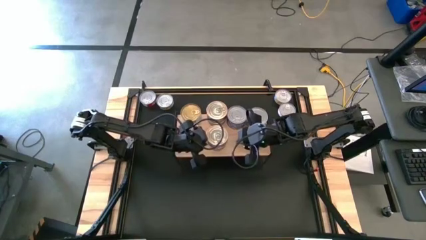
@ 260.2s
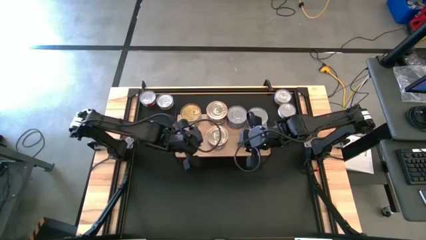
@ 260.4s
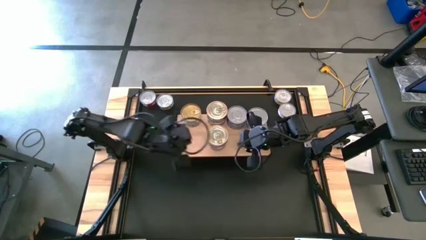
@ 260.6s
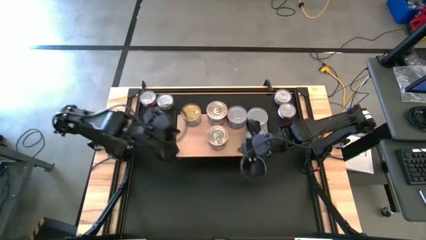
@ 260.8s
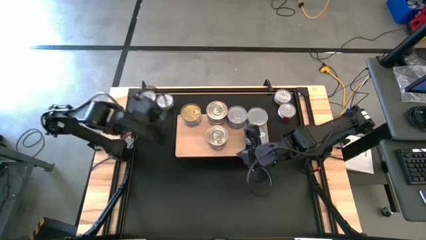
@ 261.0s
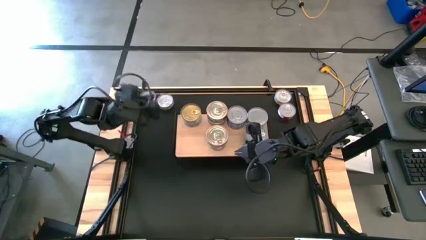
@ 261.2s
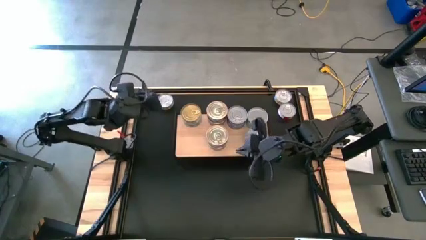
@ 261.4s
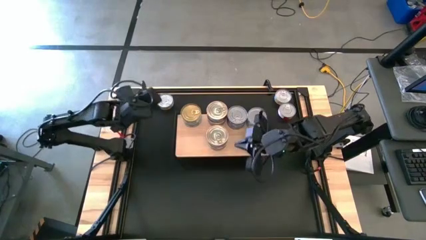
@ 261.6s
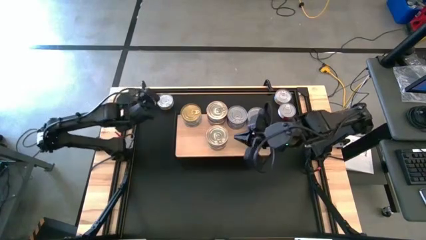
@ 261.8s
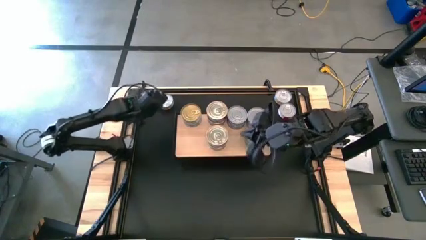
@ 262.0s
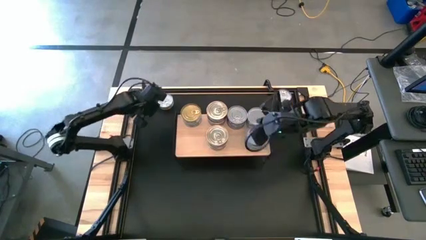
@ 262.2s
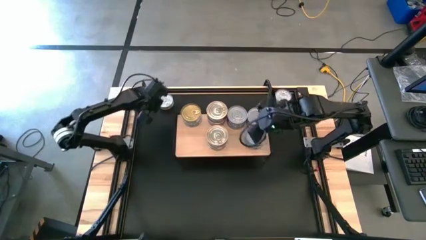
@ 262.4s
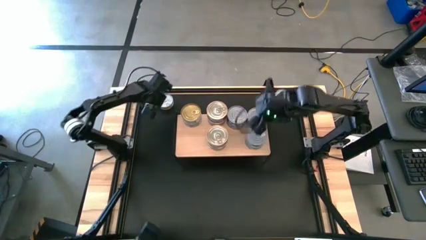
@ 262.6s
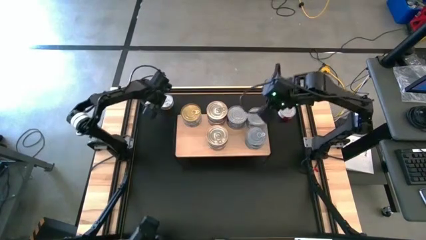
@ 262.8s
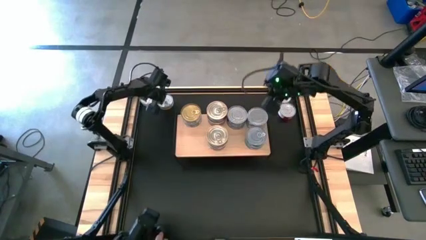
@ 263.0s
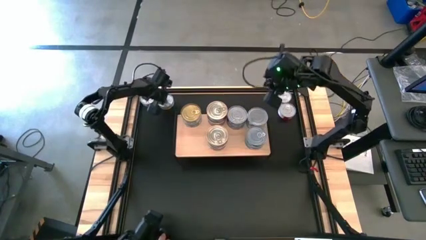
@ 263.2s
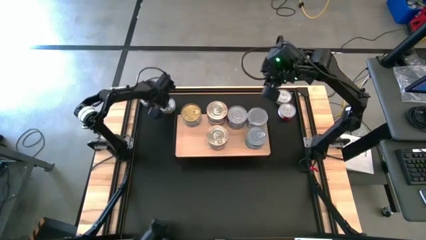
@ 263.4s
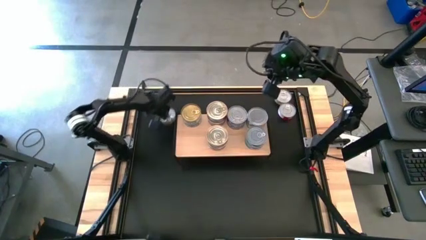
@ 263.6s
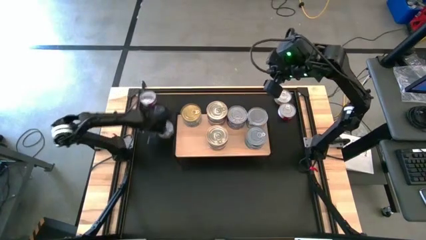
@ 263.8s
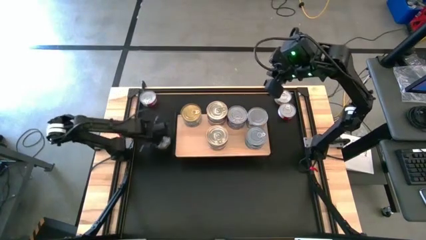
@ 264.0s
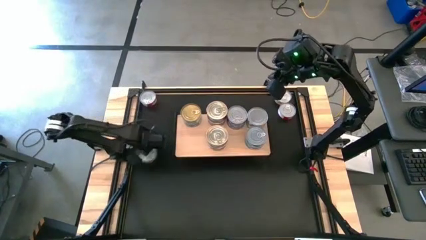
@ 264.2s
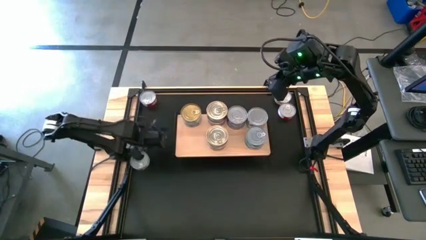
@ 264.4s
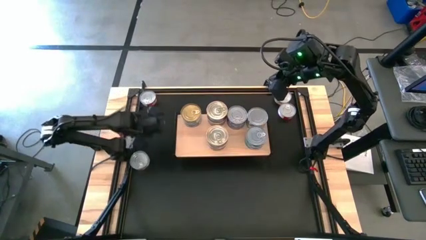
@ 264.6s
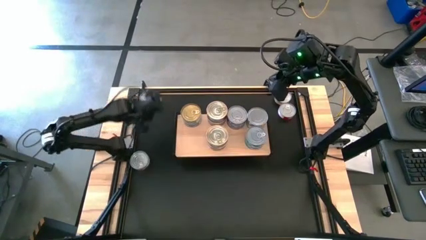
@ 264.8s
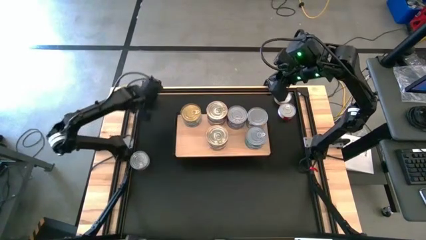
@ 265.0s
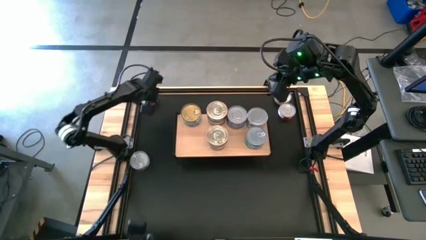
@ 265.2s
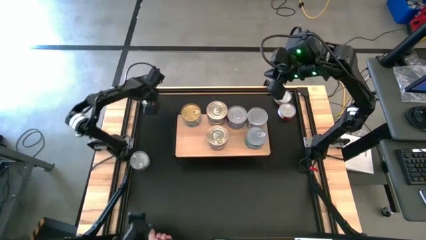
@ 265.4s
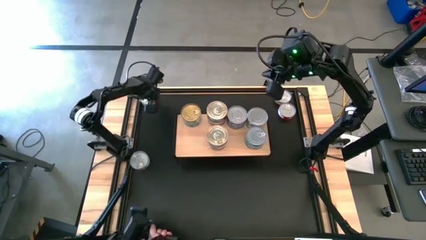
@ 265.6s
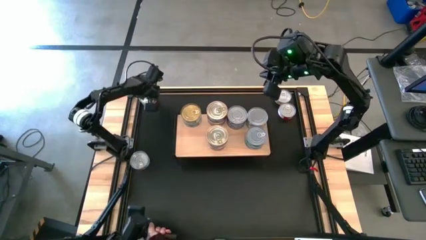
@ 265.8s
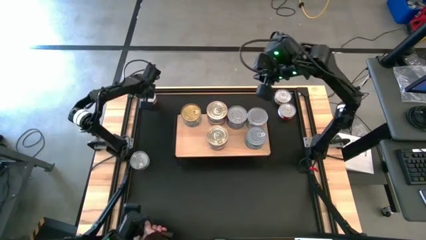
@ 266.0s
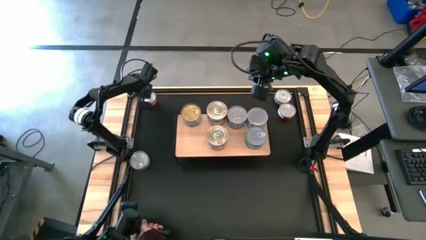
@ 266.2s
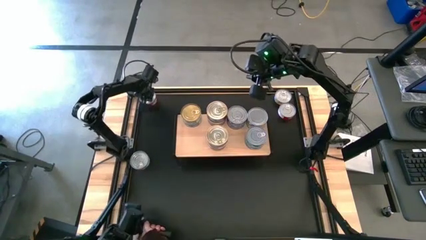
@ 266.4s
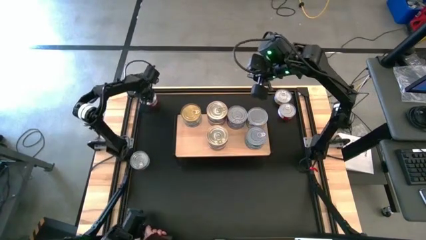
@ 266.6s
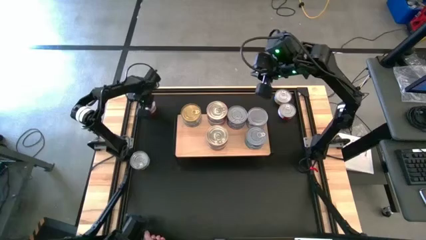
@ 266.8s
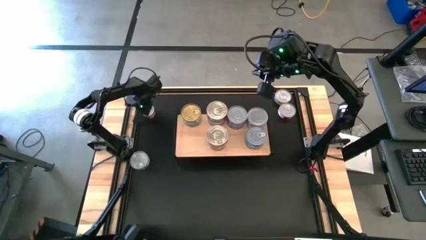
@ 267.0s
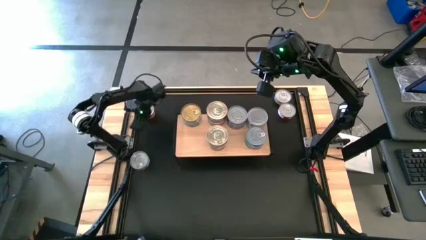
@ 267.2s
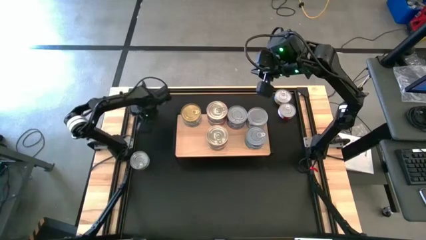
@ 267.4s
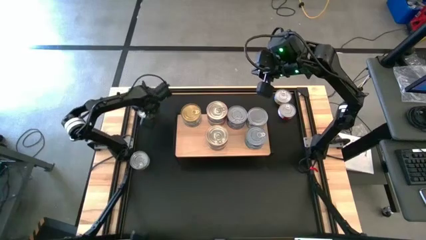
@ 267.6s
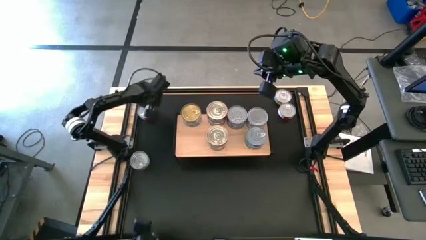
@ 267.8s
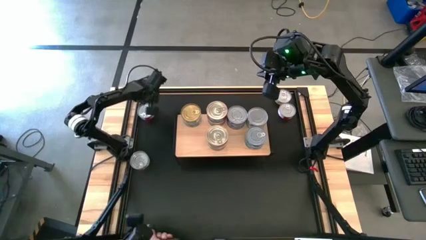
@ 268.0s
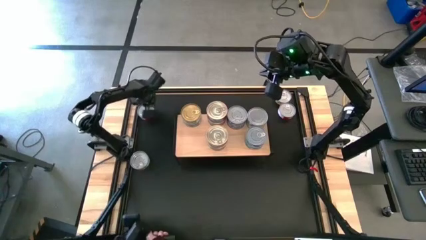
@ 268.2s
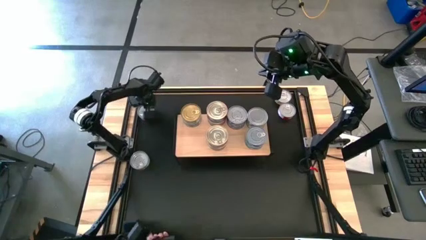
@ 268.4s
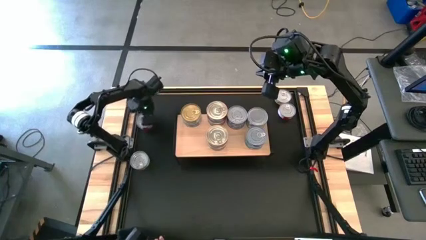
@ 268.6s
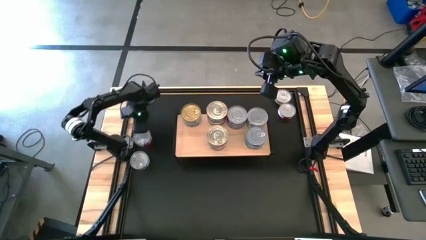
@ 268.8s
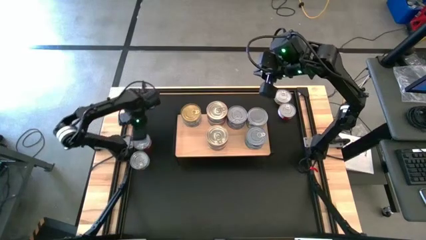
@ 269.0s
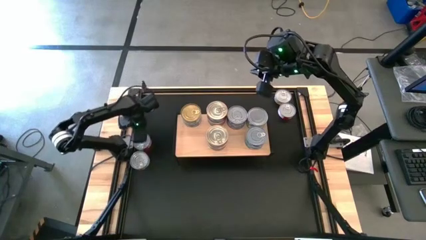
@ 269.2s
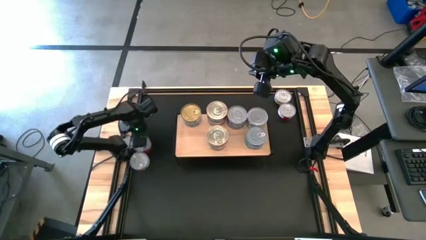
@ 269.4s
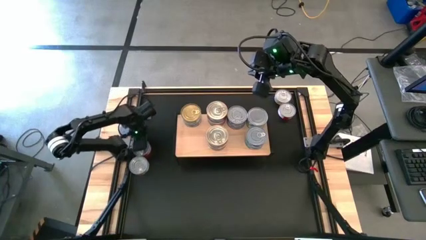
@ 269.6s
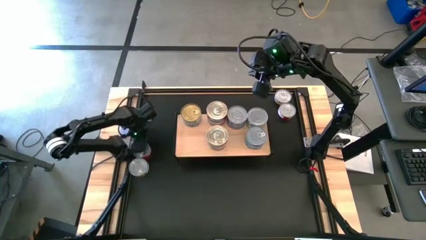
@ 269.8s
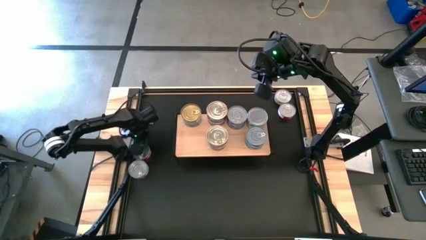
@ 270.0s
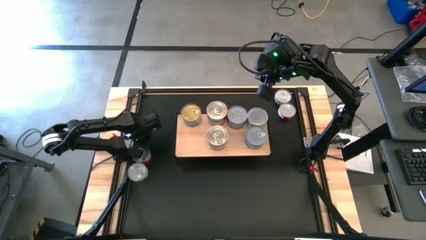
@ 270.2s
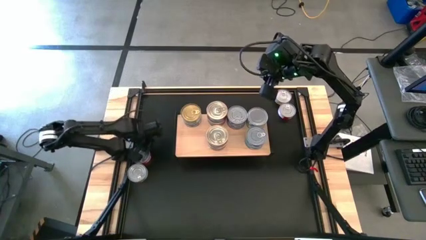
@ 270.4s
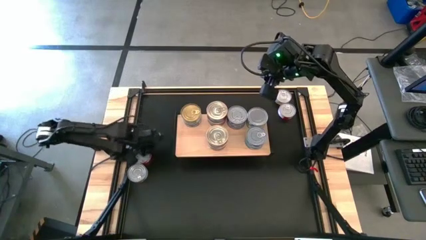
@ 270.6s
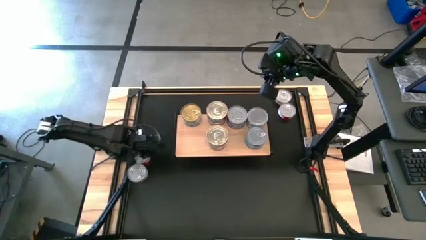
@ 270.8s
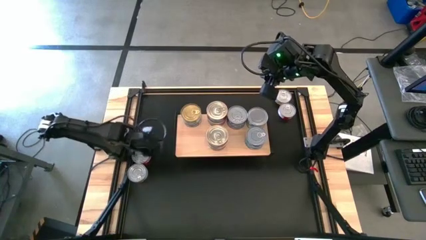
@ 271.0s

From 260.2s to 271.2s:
Task: Stack canned seafood by type on shelf
Put the red tuna can on the shelf

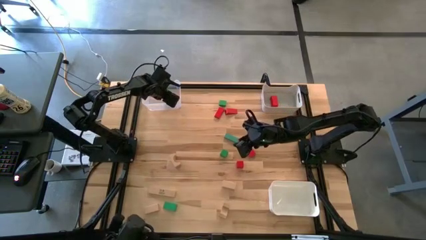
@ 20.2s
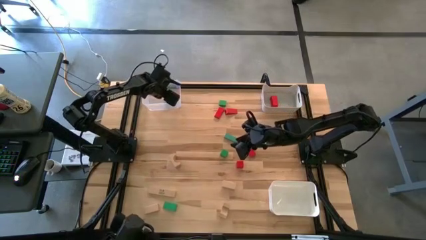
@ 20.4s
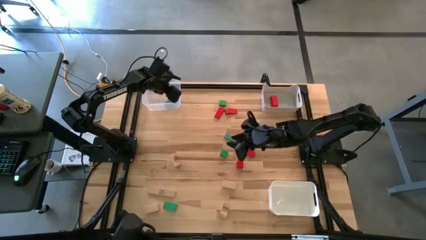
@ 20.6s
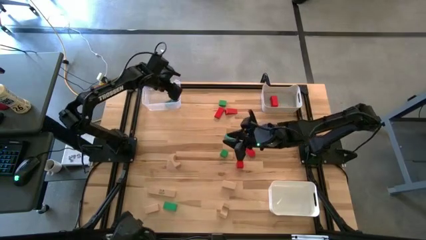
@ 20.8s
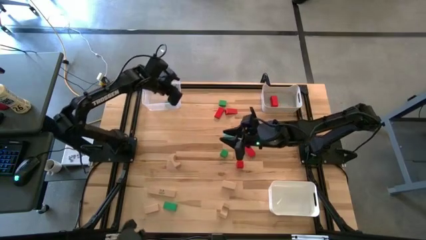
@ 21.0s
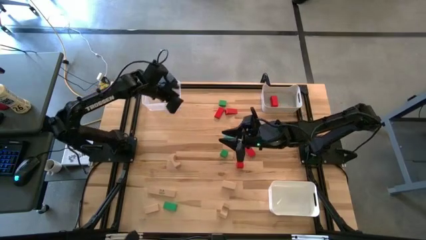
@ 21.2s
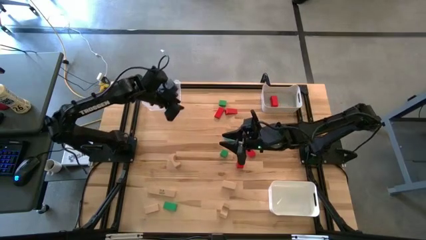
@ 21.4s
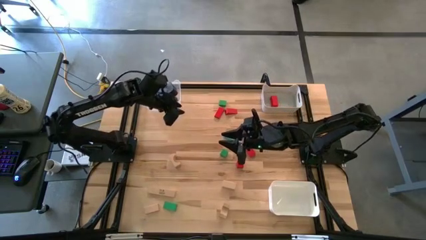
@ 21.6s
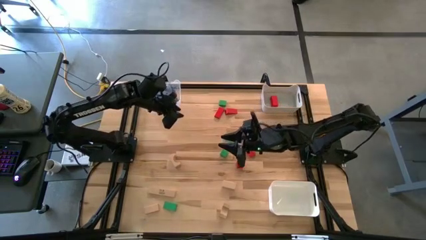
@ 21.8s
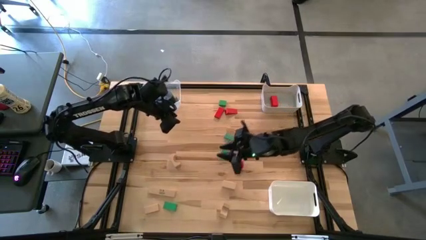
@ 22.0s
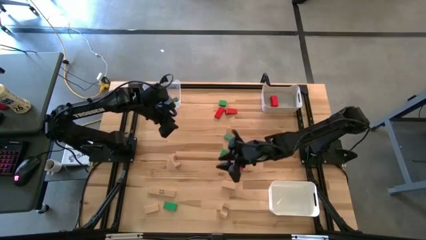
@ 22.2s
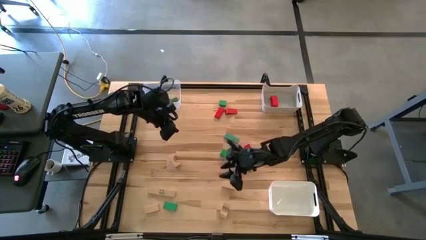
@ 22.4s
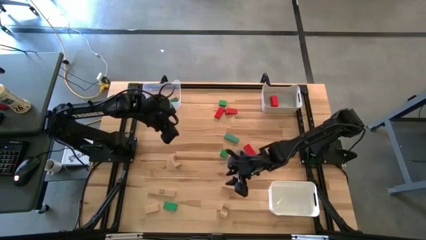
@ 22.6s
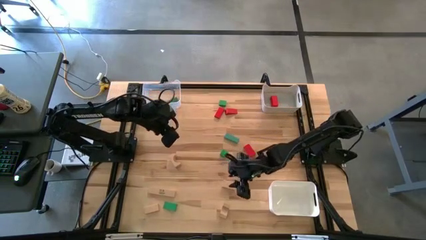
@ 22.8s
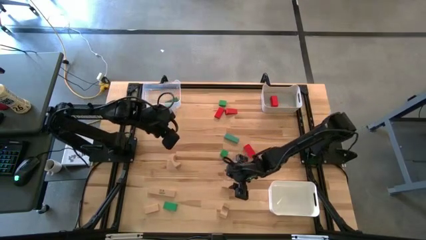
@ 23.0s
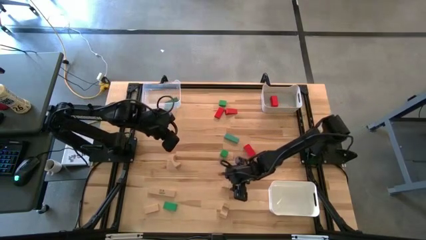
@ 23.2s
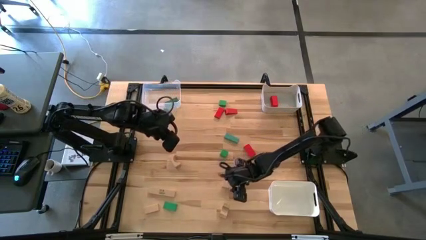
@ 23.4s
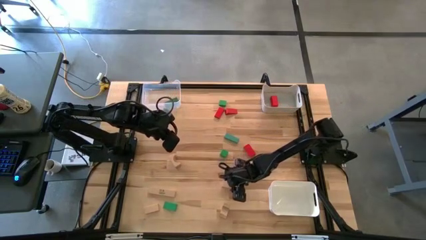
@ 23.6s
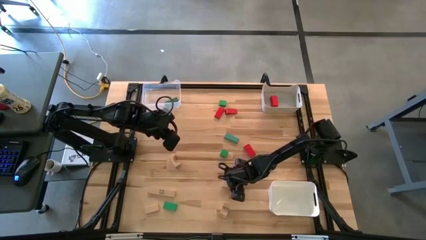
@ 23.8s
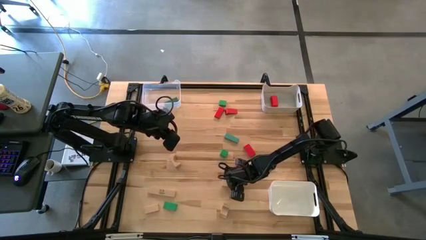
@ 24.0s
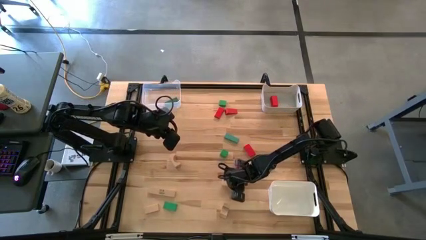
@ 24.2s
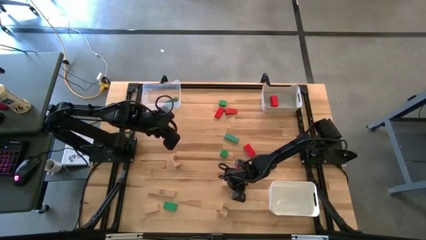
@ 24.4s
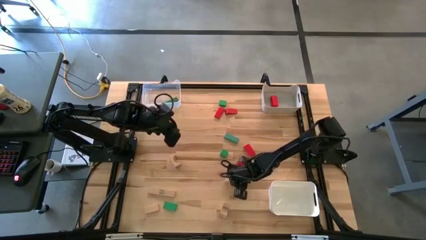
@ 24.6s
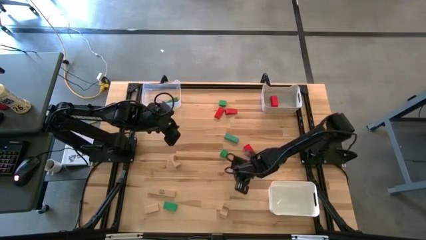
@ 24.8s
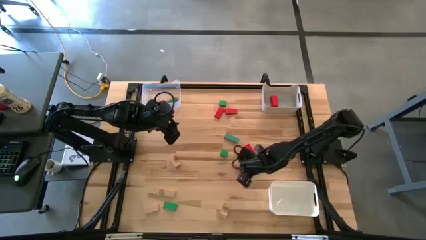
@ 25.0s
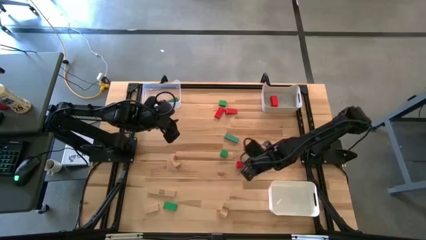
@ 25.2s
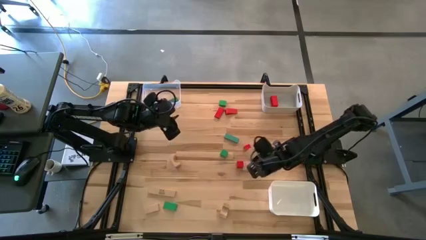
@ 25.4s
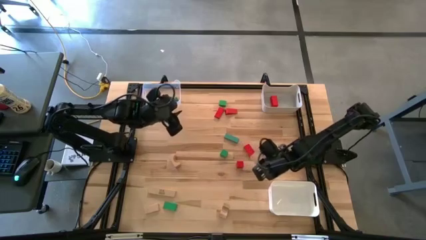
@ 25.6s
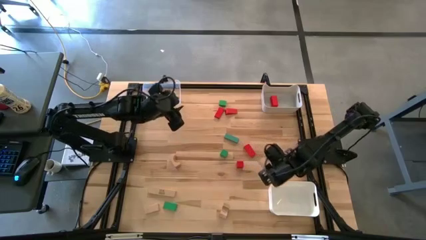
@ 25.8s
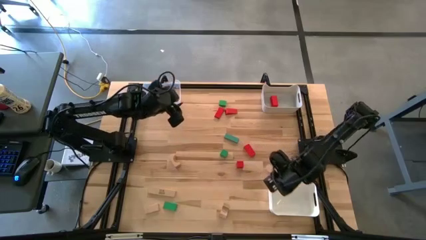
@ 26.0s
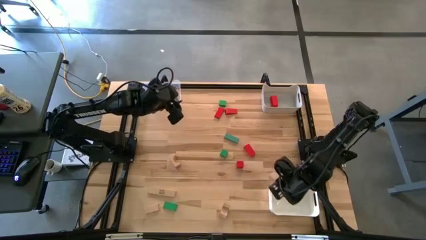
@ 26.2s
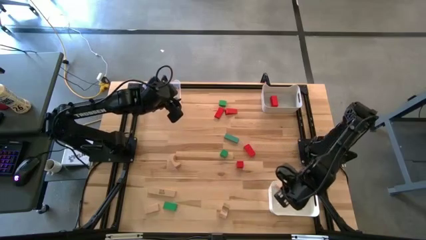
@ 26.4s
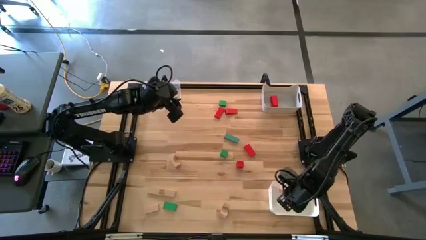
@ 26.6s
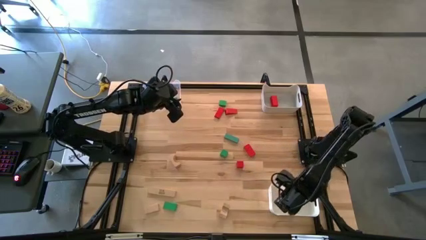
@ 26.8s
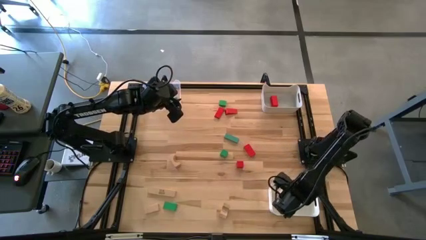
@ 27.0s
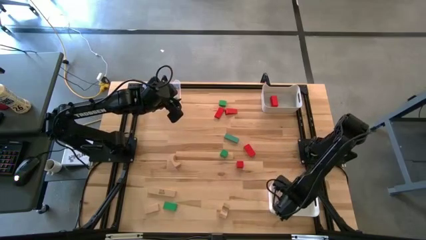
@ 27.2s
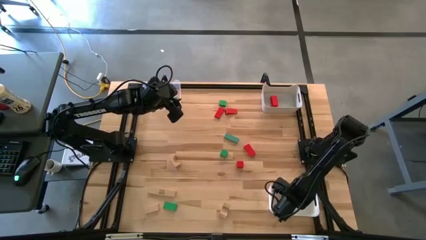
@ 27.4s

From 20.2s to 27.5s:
Task: Sort & place blocks by color
Put the brown block into the white bin
